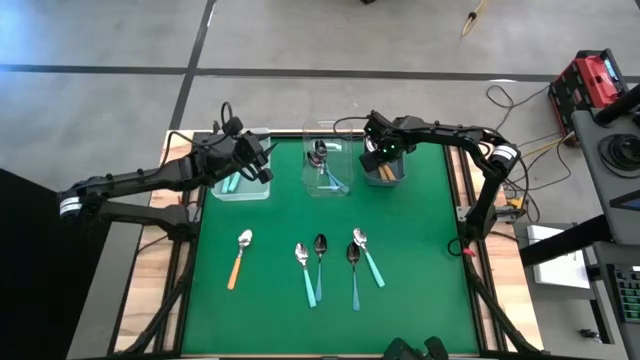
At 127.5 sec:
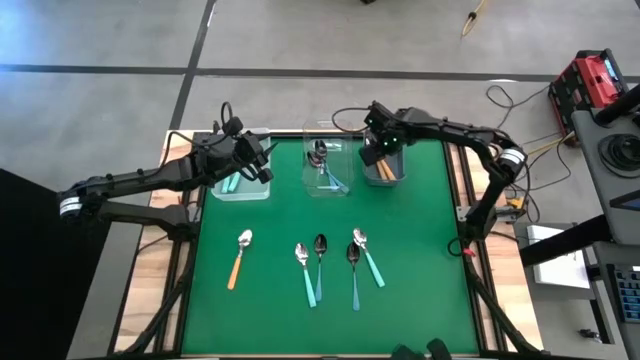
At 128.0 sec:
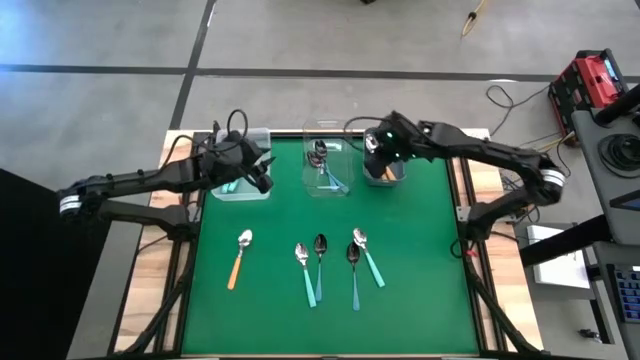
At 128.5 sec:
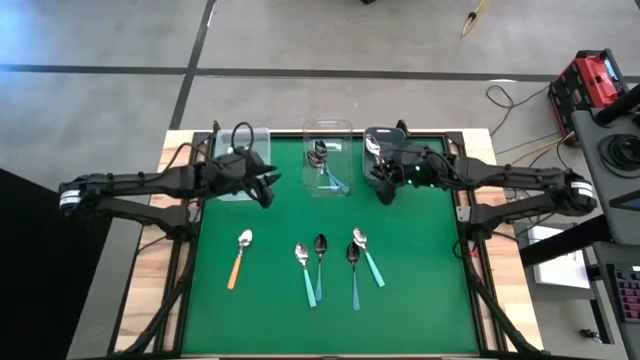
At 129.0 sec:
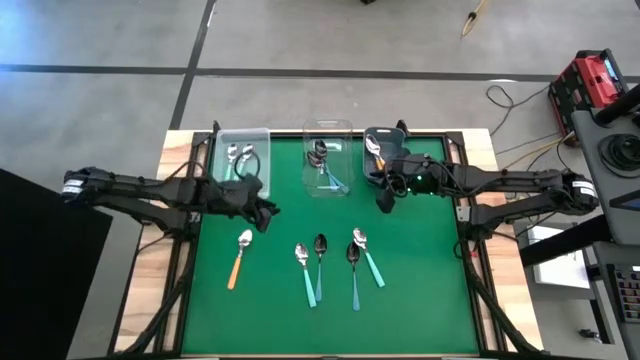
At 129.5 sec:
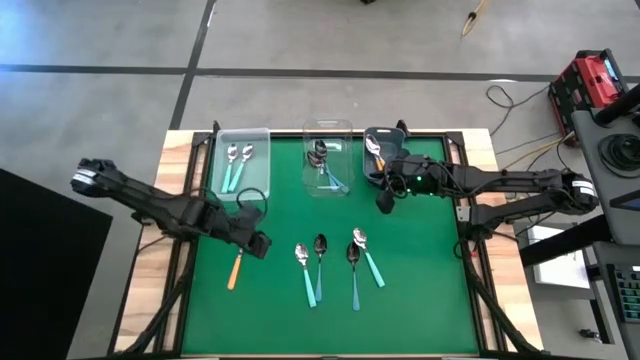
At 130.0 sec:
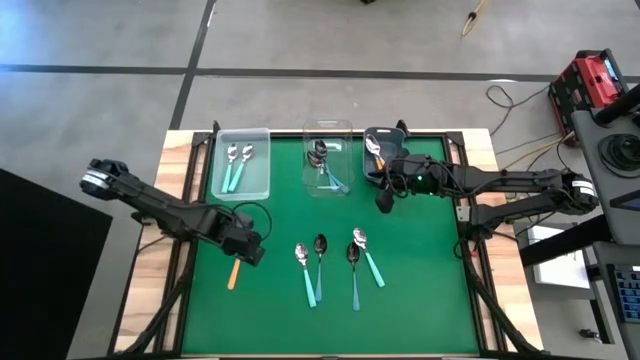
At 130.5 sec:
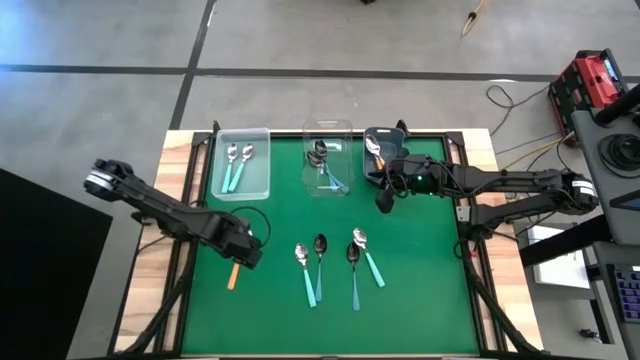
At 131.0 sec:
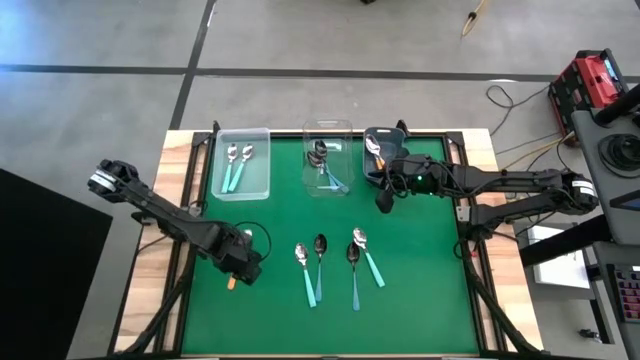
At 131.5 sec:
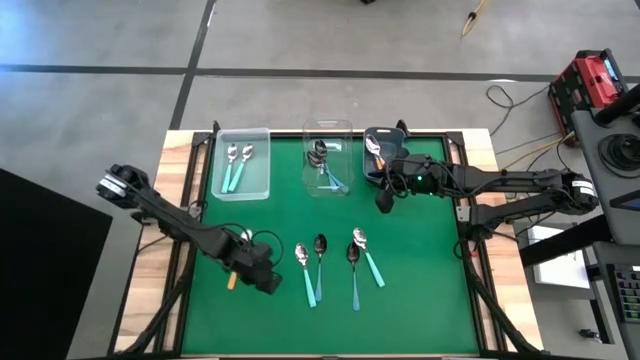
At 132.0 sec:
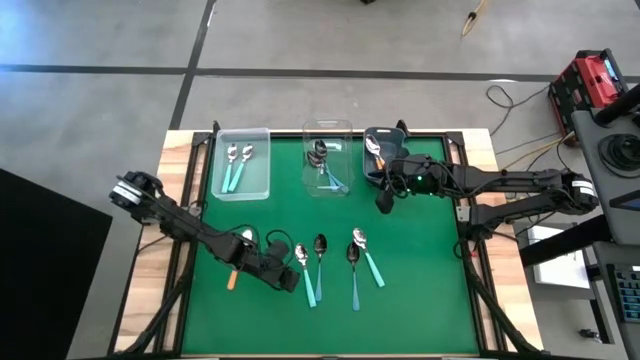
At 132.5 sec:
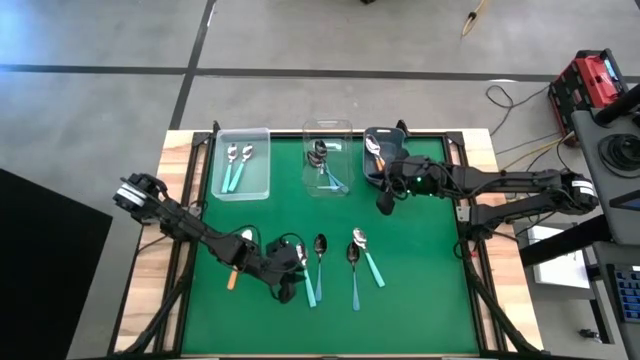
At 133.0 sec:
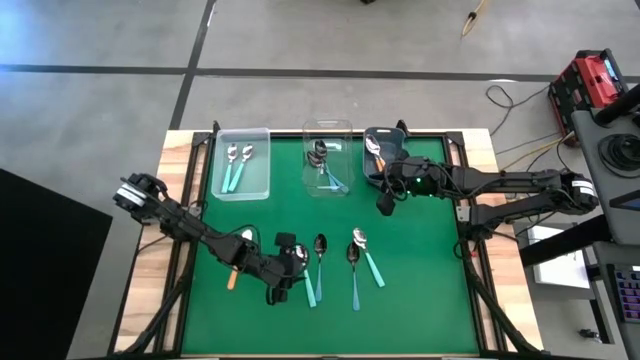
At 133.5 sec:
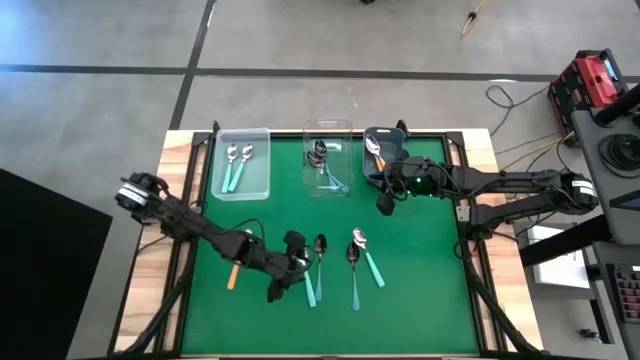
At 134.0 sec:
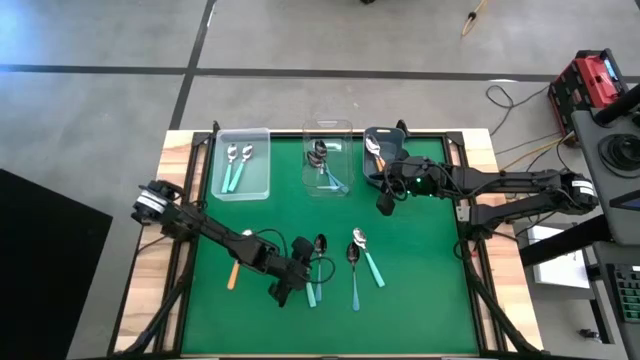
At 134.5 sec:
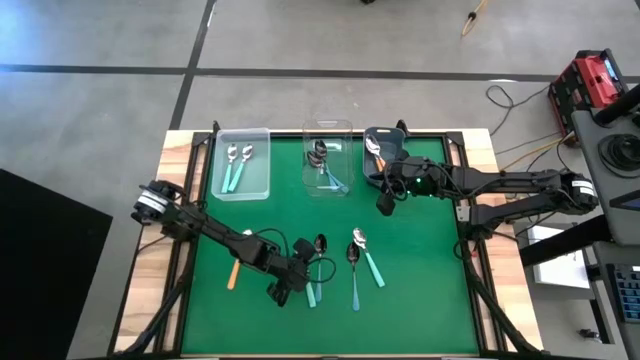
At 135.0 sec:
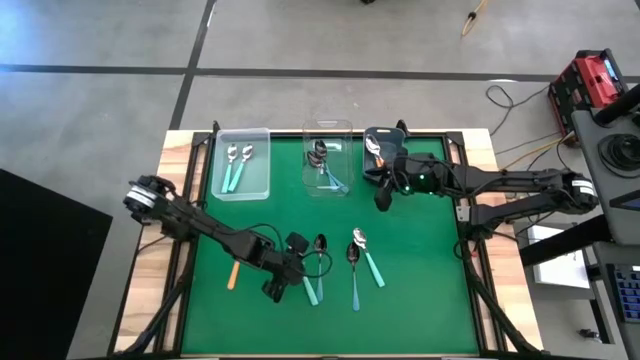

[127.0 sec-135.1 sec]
Task: Sort silverware by color (type)
Put the green spoon into the white bin

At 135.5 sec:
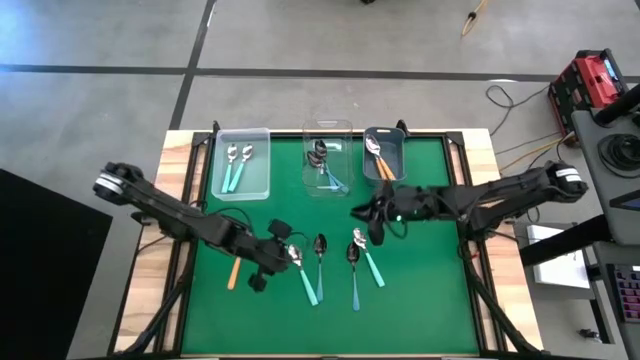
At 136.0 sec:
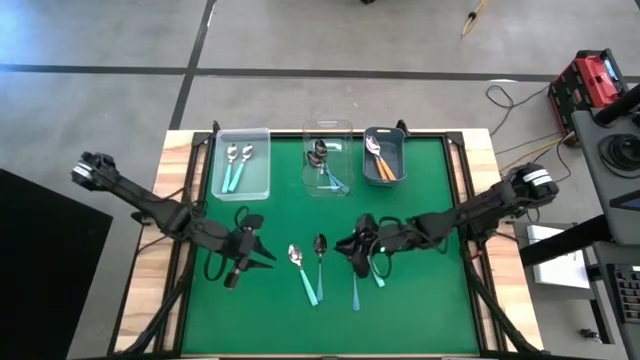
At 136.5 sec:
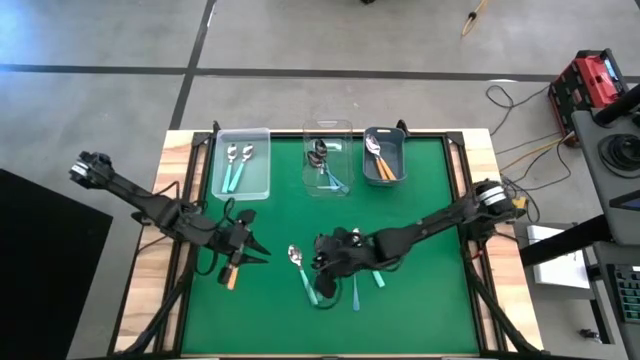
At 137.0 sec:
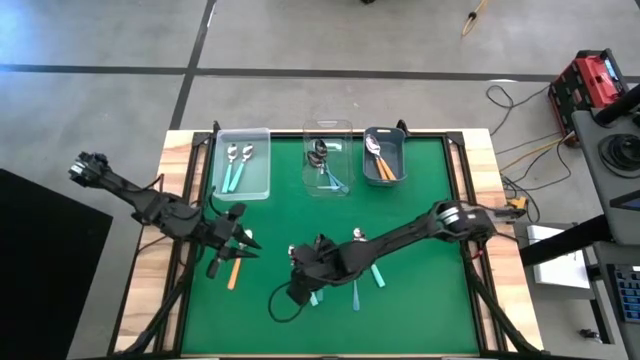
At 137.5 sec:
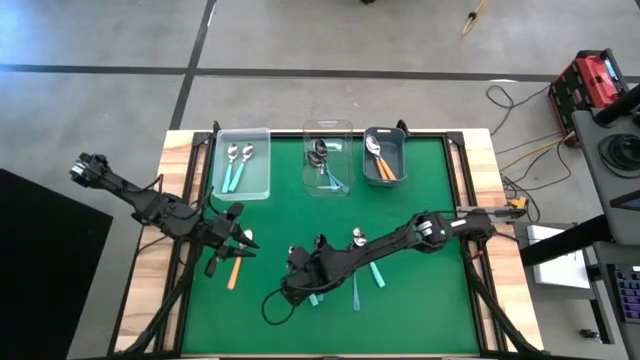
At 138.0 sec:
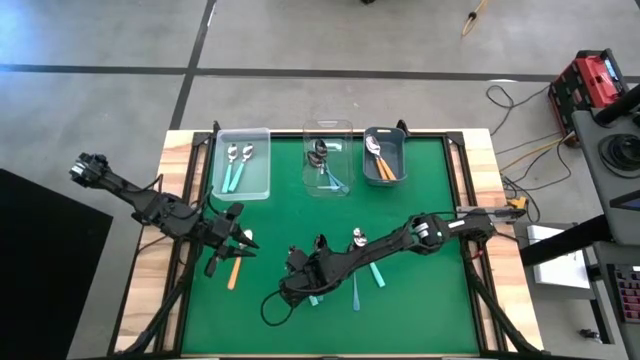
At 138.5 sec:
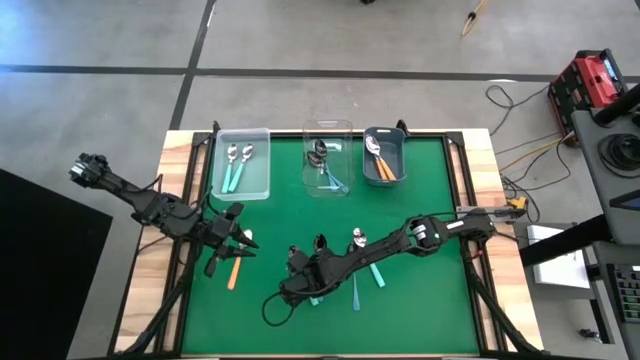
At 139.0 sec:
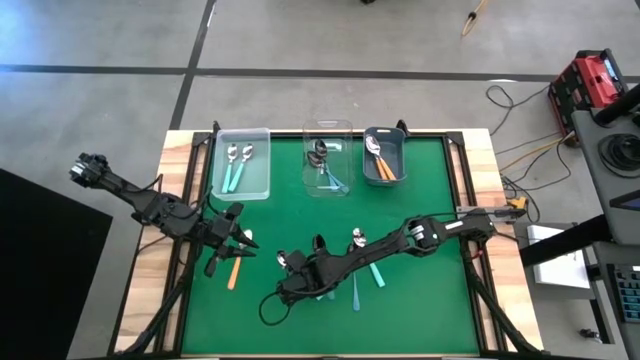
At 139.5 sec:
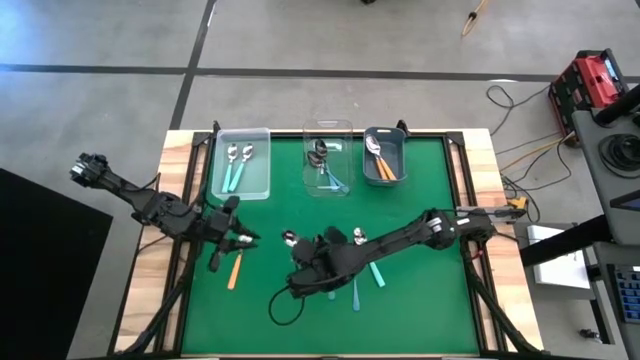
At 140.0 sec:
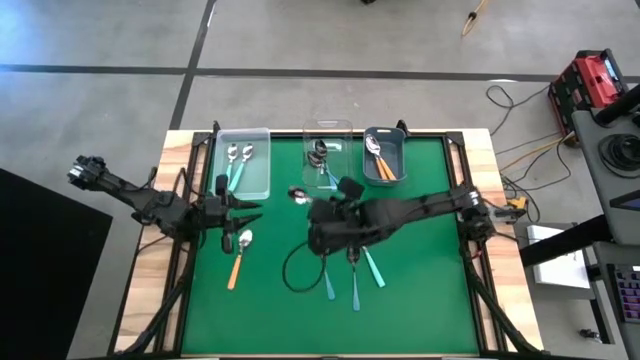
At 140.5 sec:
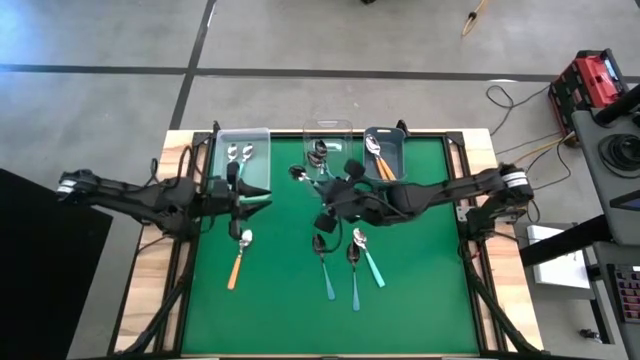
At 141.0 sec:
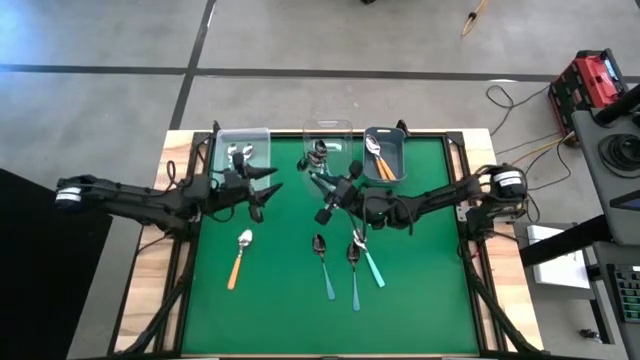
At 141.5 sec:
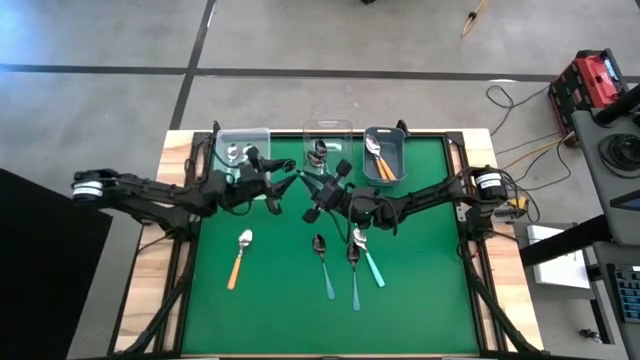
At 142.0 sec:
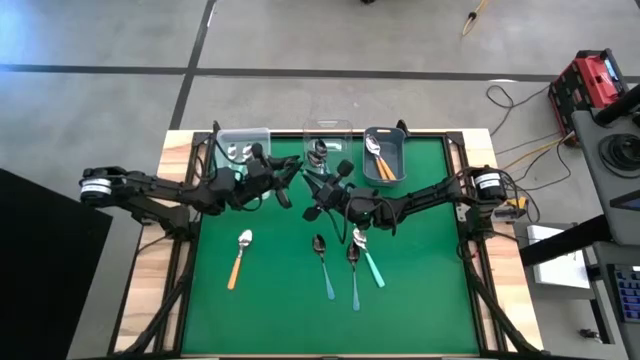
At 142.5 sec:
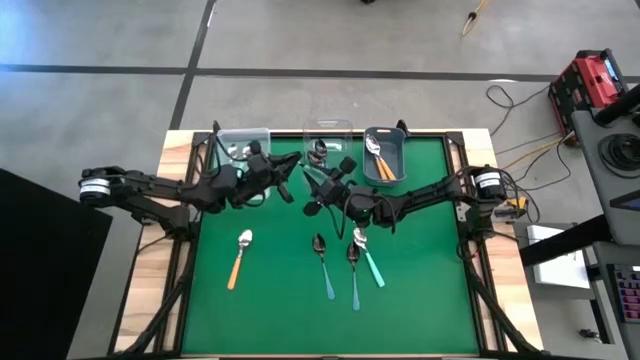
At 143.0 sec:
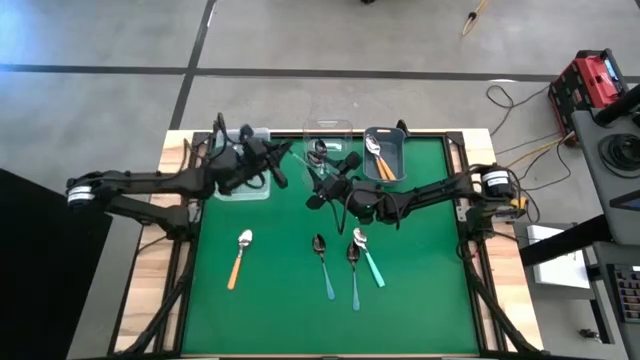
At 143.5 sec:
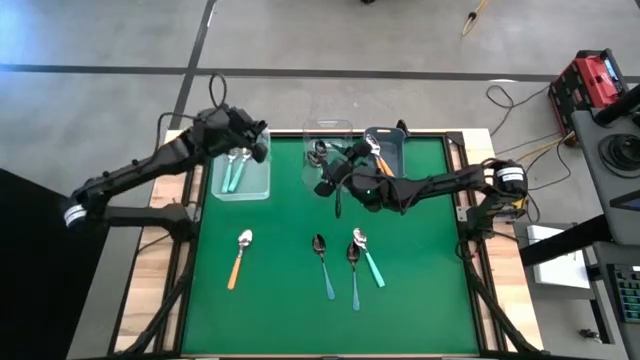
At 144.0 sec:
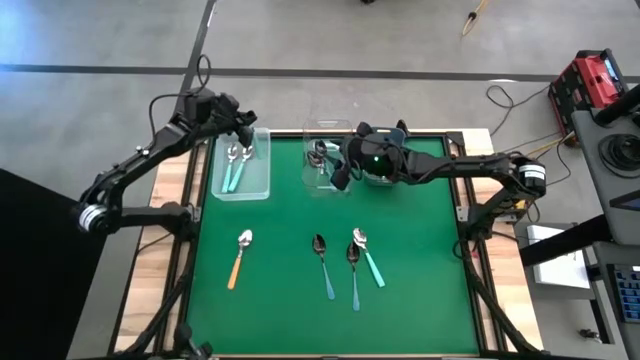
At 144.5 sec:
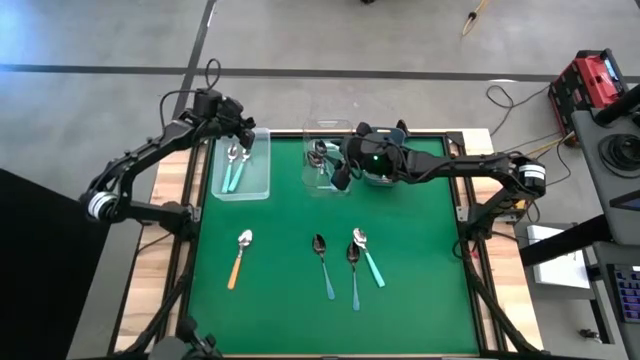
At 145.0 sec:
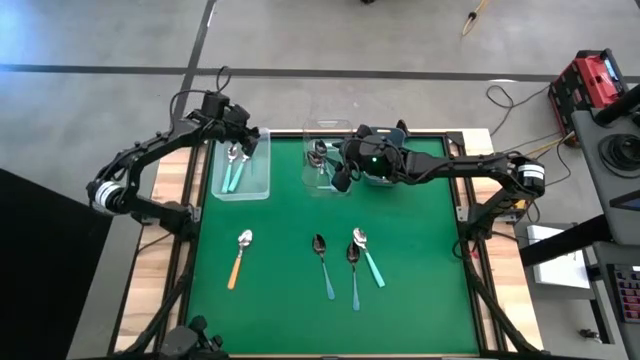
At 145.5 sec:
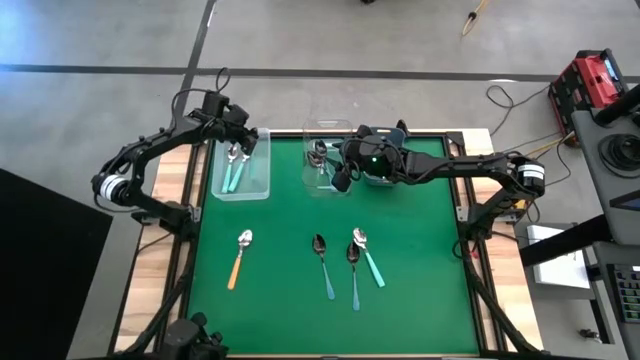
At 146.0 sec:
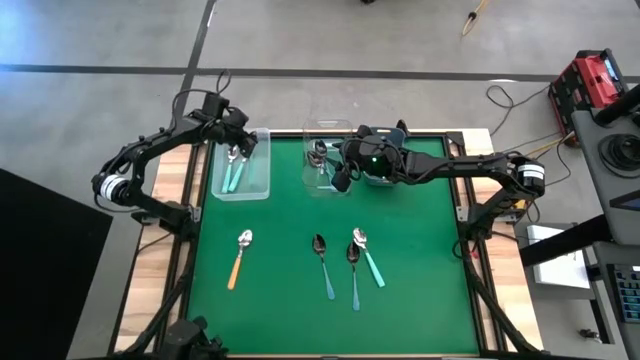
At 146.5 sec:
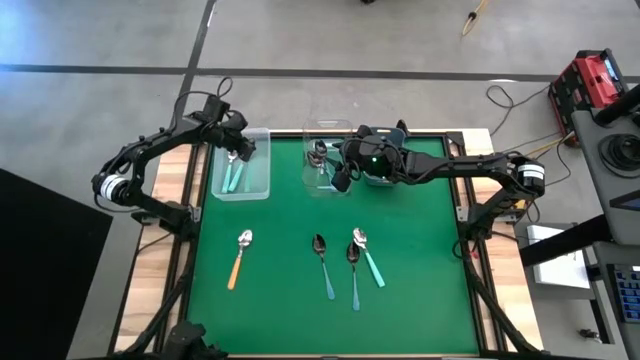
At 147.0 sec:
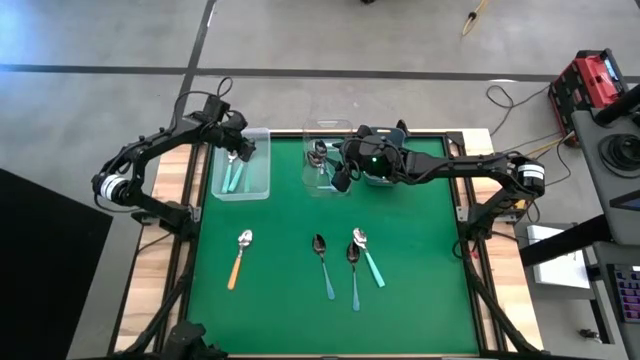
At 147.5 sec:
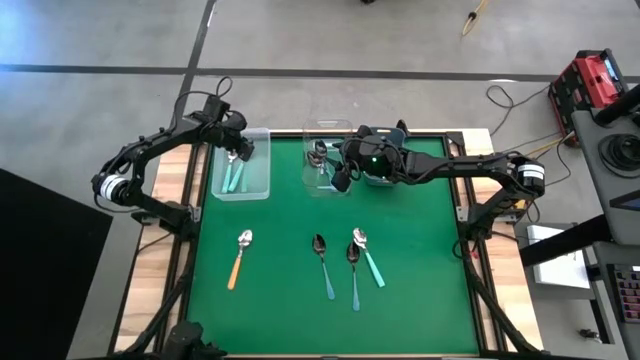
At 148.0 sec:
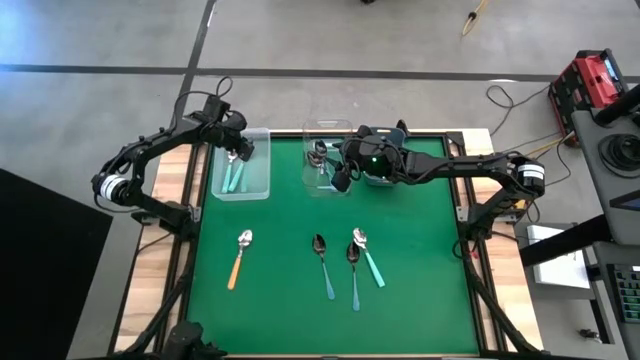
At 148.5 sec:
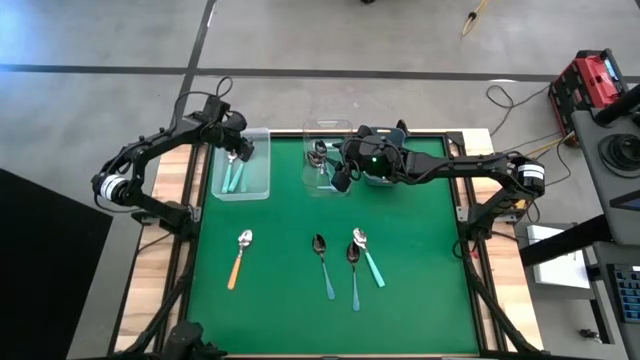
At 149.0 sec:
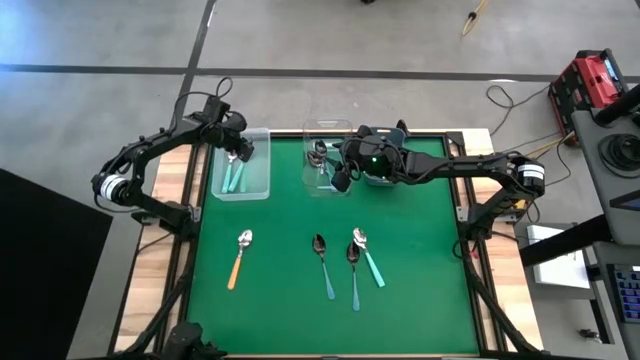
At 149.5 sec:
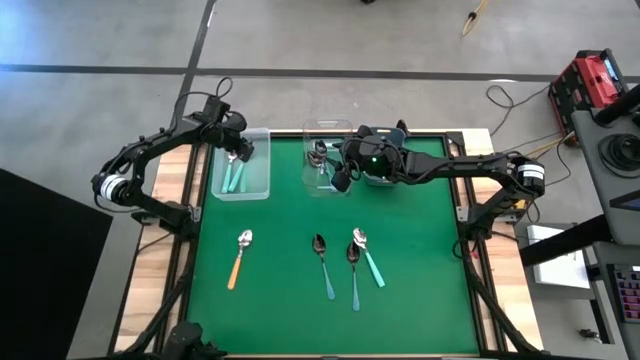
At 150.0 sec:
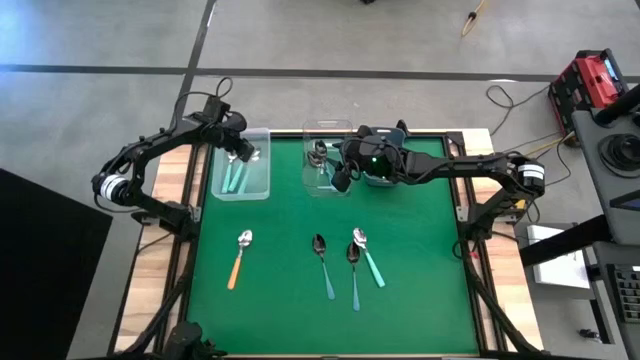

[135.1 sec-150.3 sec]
Put the green spoon into the white bin
